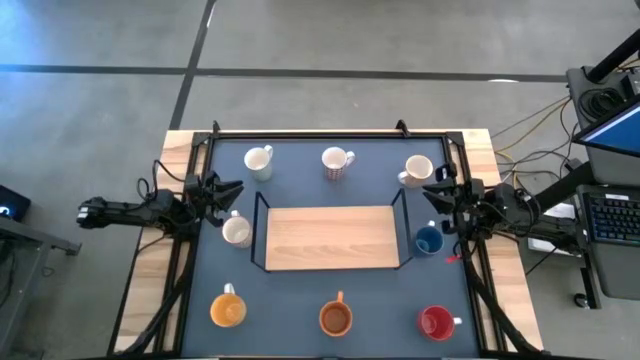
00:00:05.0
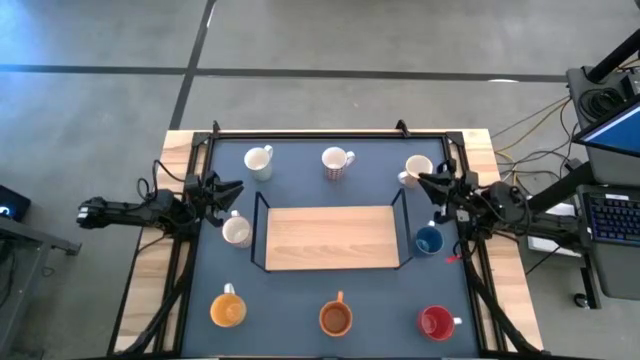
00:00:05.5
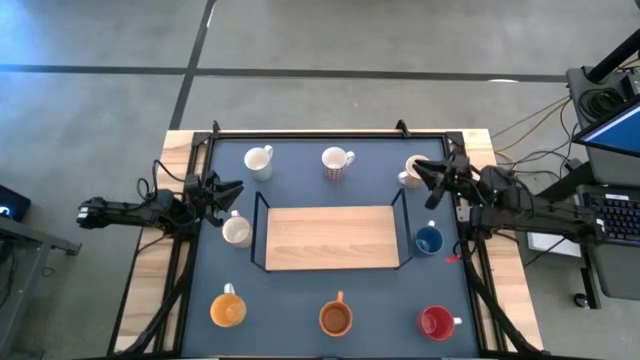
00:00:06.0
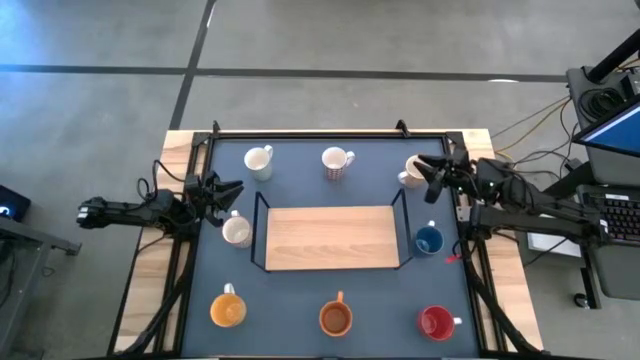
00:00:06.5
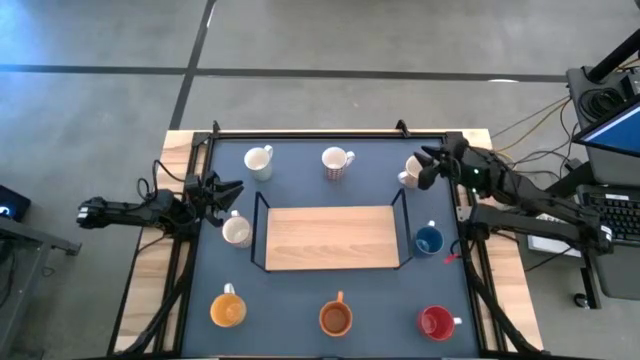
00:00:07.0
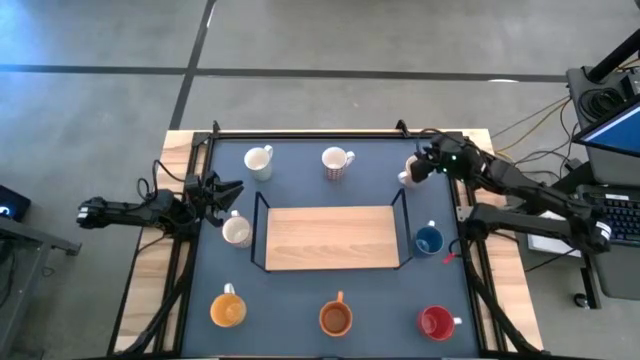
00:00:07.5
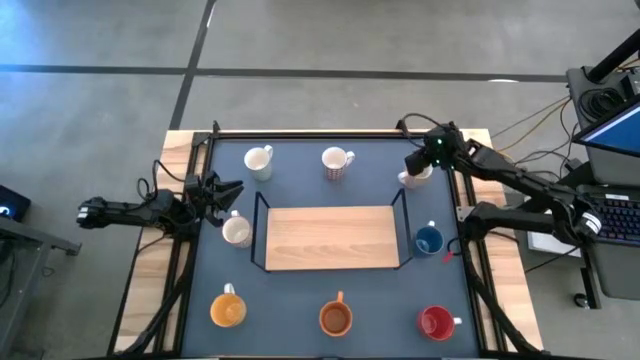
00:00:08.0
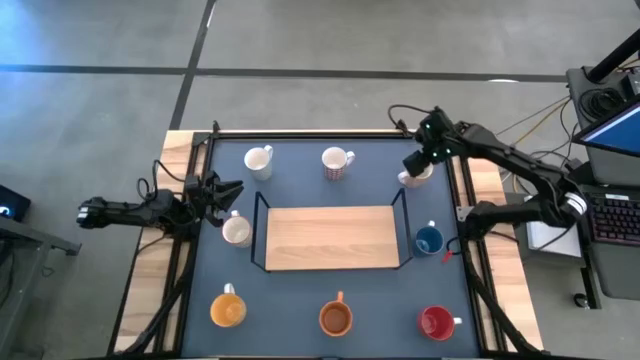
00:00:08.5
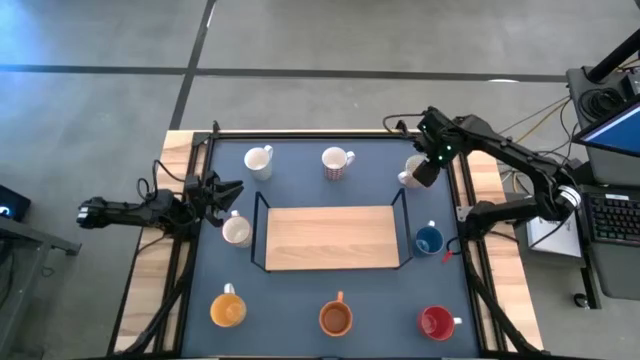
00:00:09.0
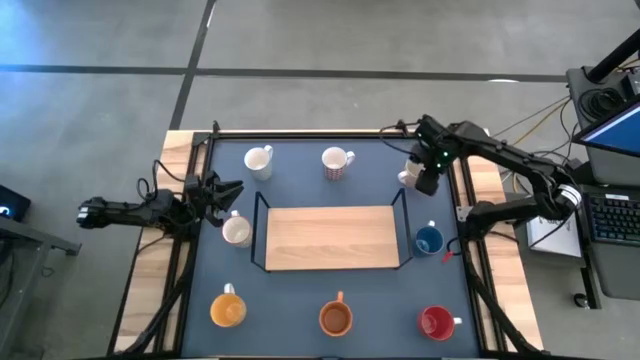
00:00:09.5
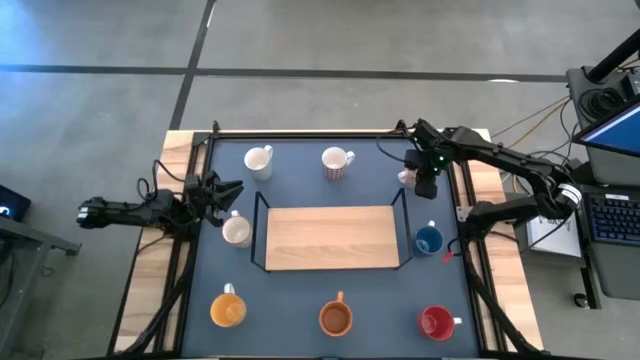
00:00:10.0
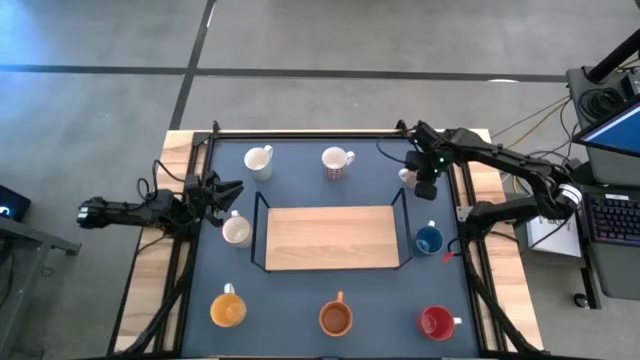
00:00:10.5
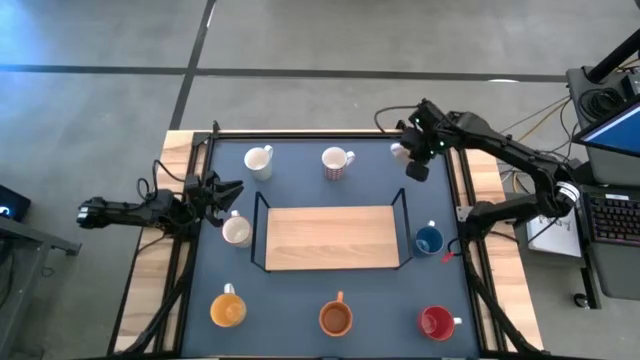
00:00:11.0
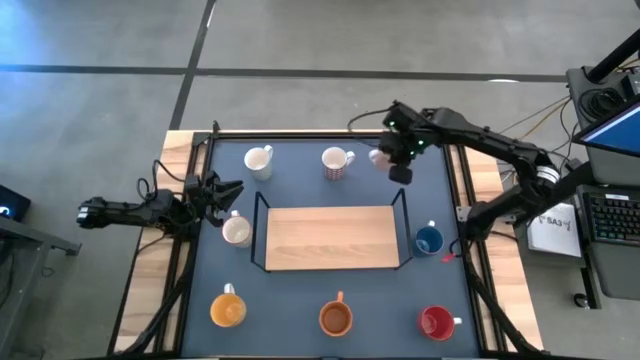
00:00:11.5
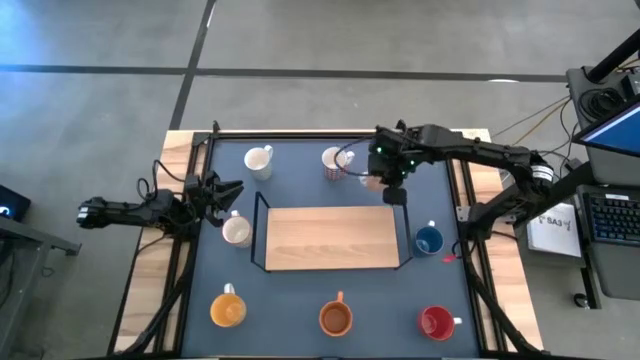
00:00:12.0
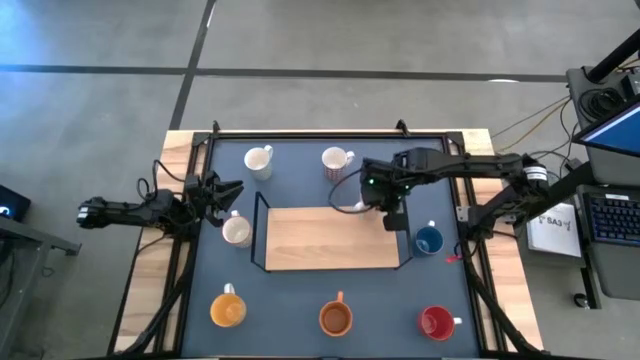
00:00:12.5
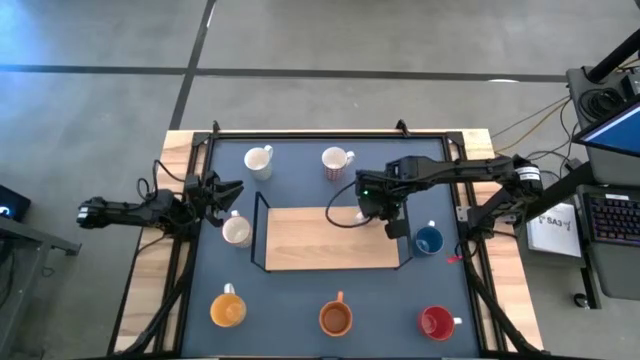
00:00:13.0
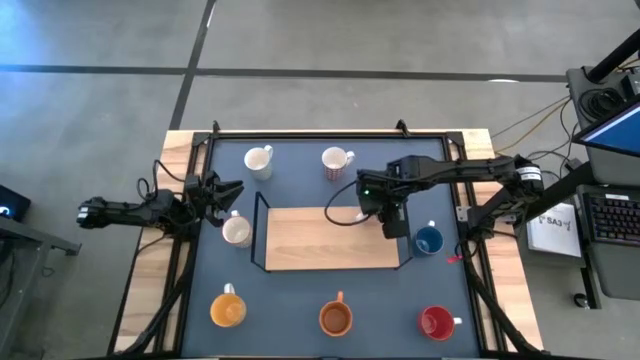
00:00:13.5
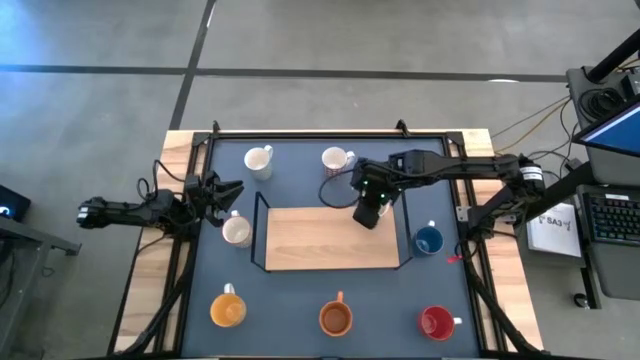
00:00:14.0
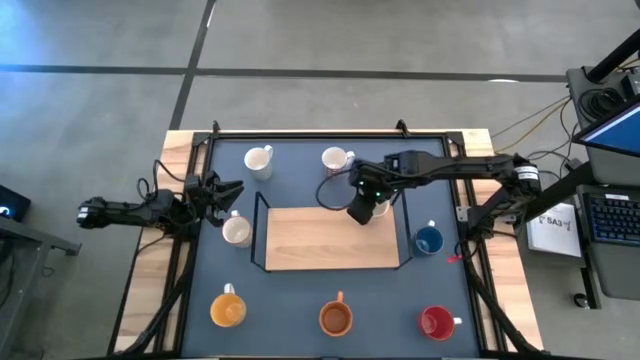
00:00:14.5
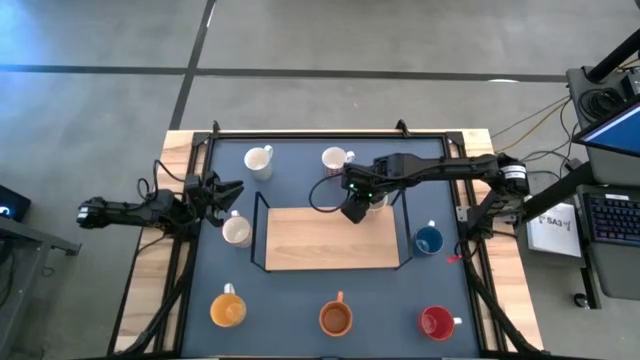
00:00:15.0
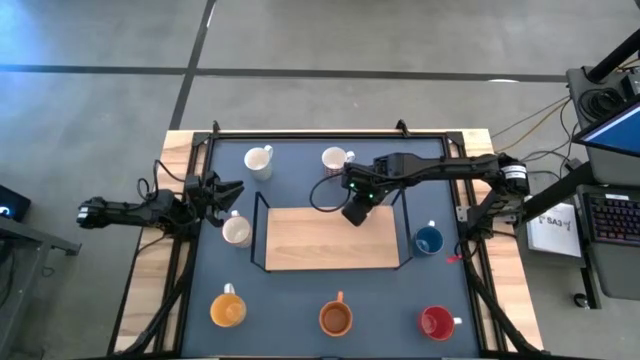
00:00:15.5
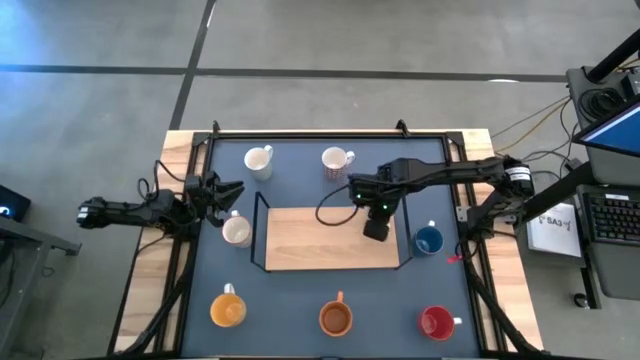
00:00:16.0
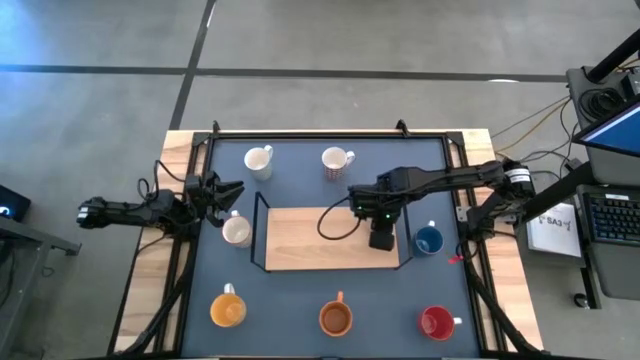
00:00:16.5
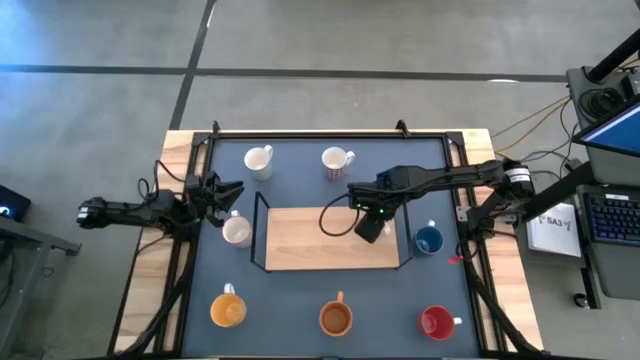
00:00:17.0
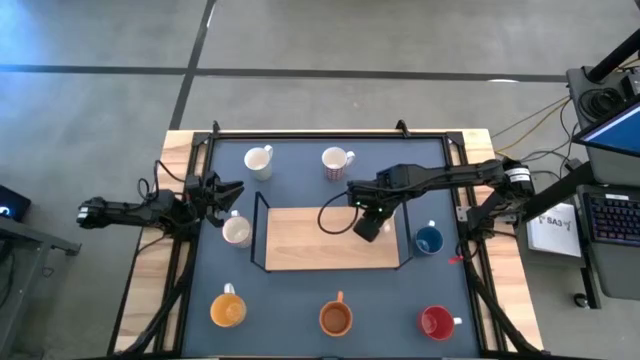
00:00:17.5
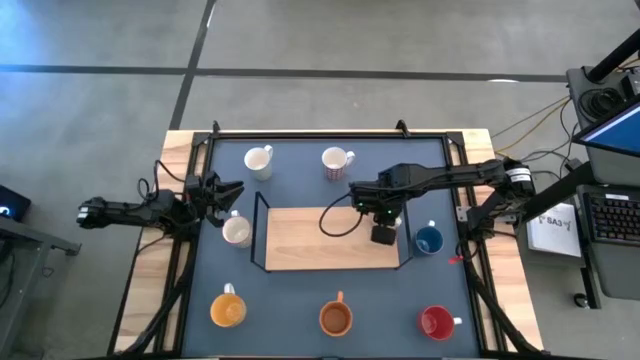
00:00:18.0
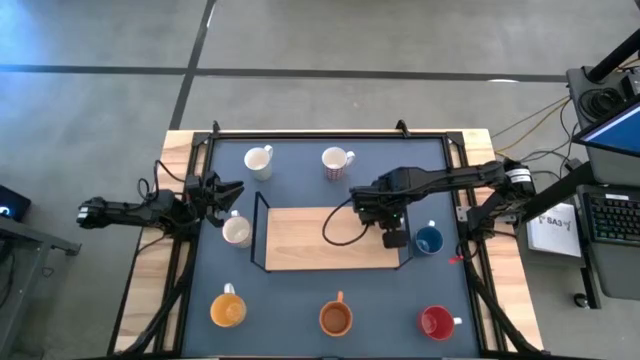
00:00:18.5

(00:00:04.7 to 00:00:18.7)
Task: Place coffee mugs
Put the orange patterned mug on the shelf

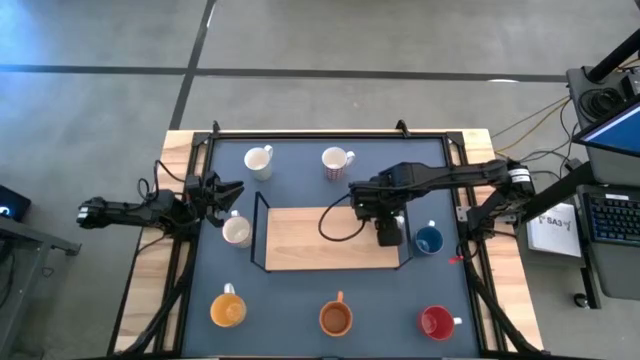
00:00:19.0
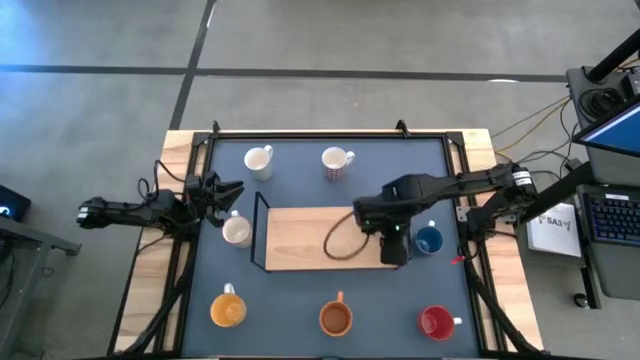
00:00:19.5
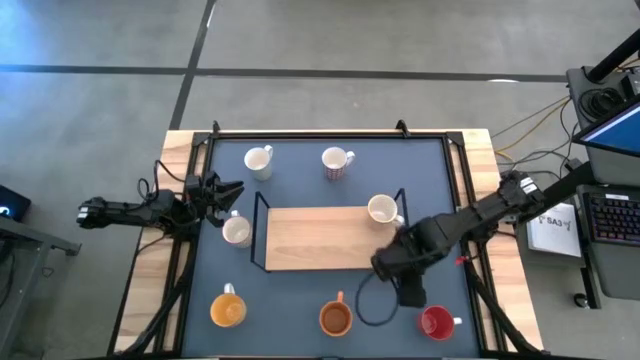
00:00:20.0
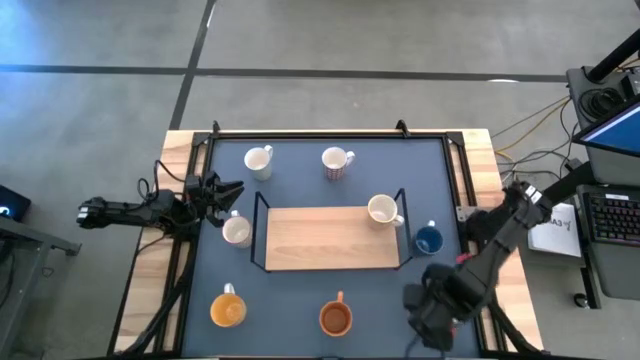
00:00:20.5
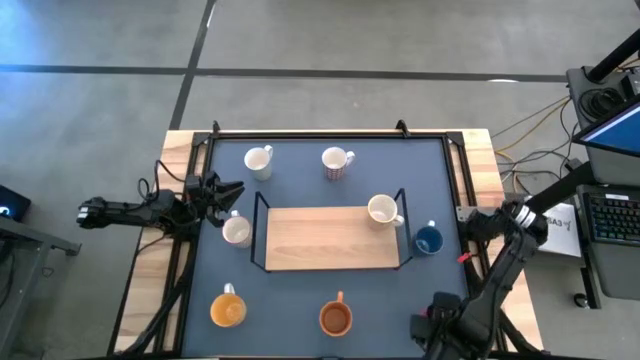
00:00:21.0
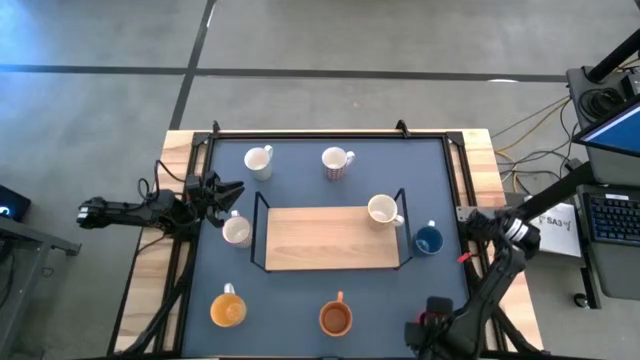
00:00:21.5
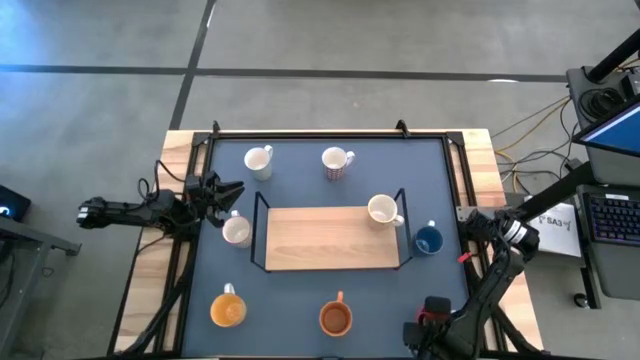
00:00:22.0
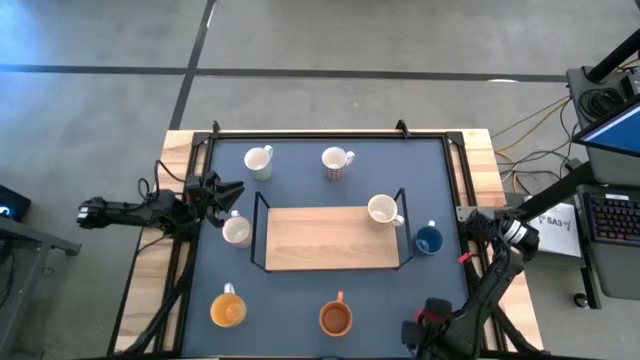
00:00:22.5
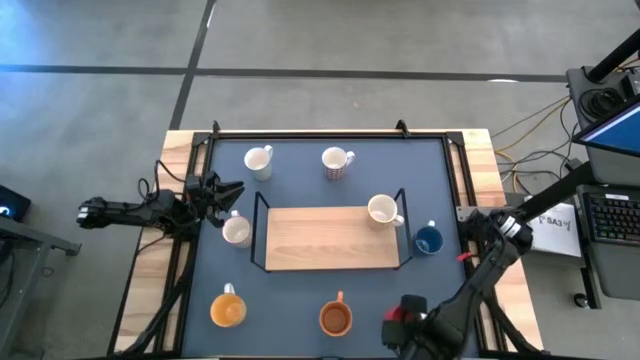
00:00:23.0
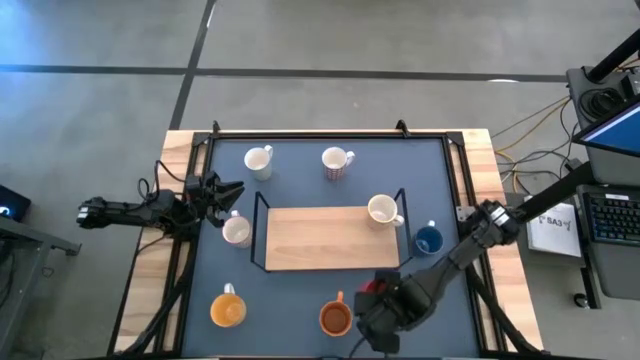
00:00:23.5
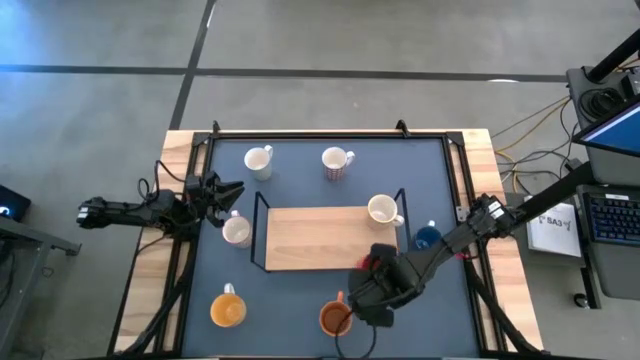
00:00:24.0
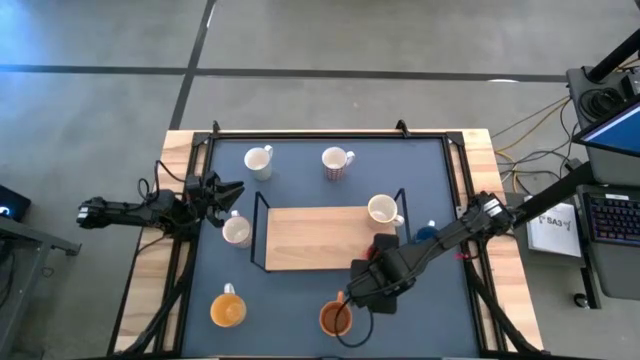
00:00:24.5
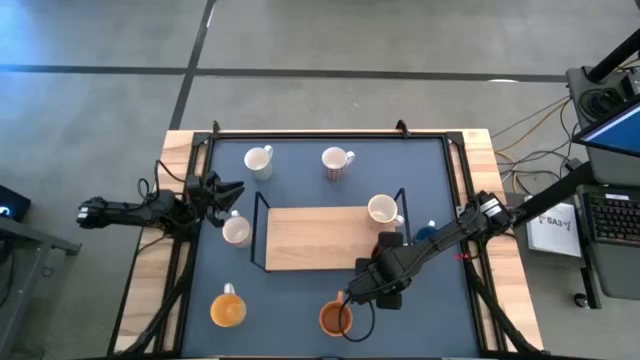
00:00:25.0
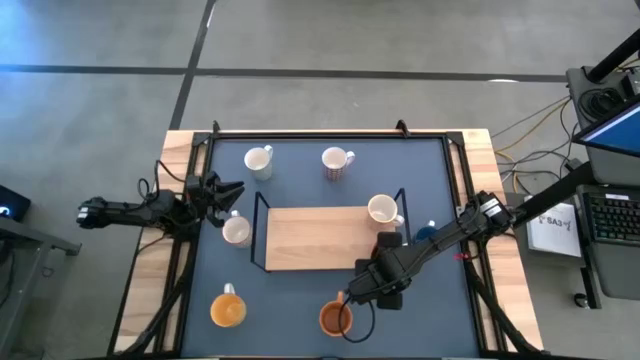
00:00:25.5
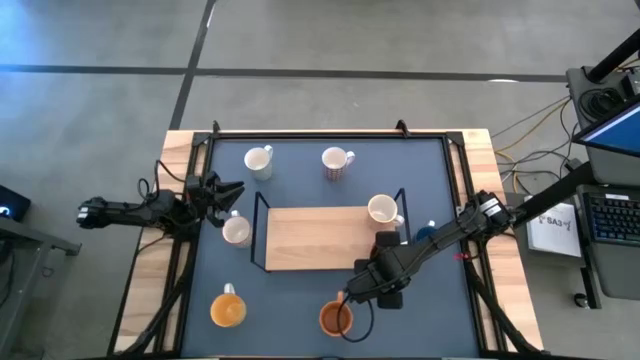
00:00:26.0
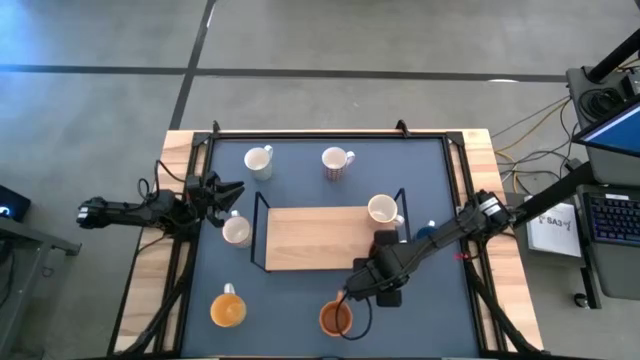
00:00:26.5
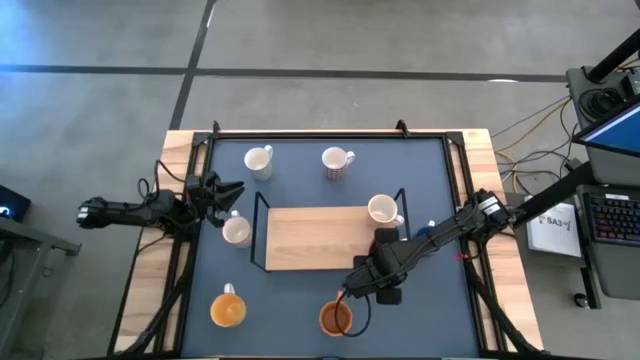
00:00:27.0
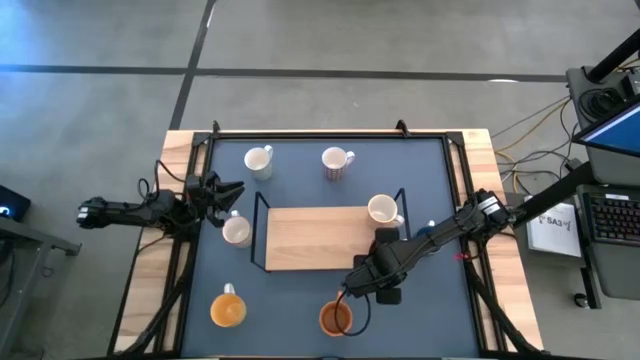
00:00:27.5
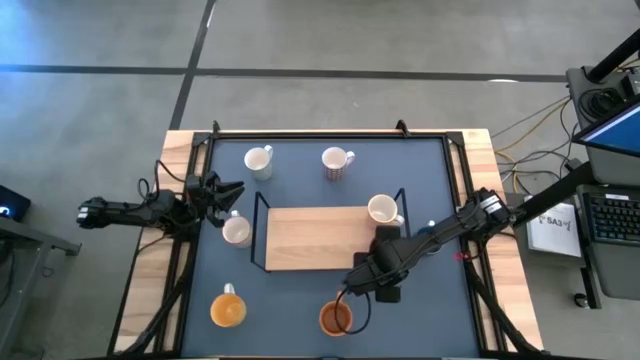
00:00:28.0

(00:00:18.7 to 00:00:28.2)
Put the red mug on the shelf
